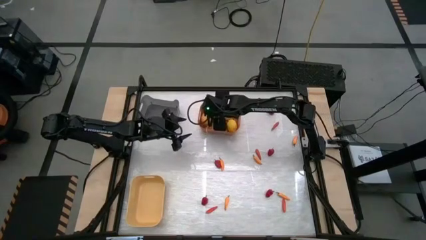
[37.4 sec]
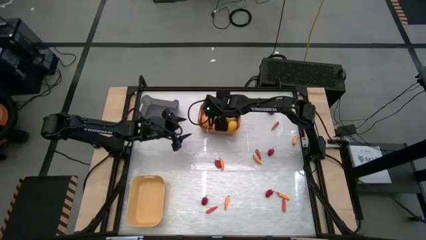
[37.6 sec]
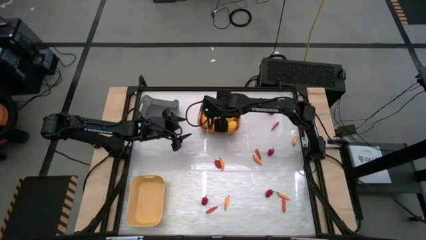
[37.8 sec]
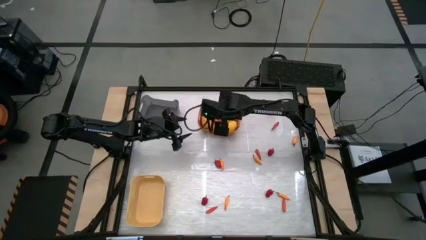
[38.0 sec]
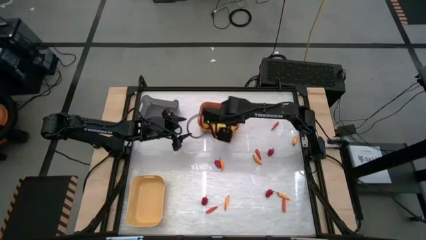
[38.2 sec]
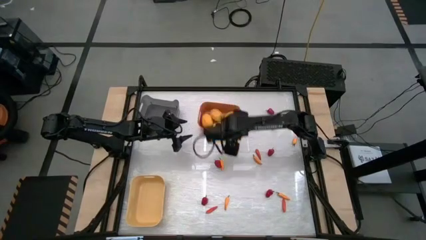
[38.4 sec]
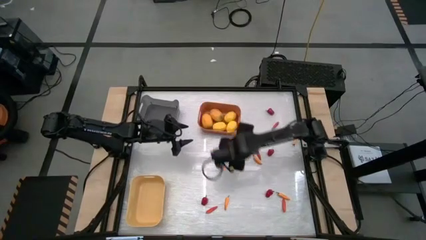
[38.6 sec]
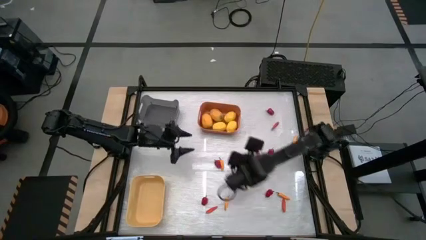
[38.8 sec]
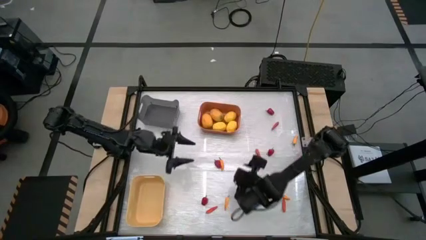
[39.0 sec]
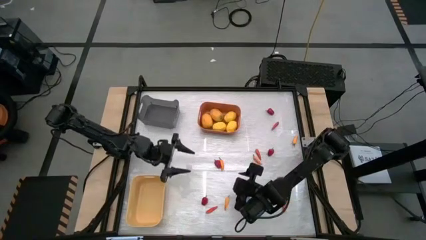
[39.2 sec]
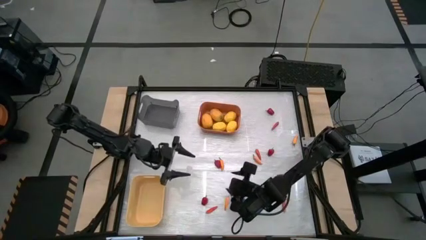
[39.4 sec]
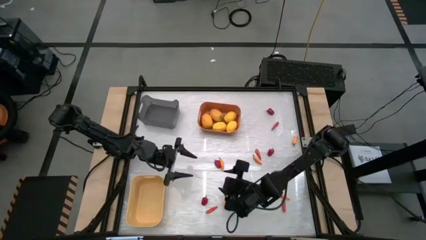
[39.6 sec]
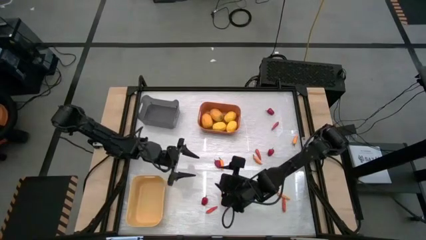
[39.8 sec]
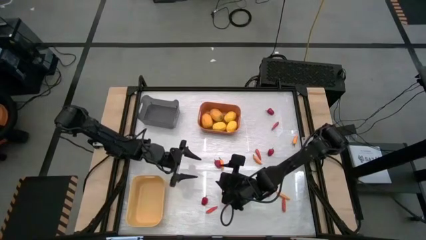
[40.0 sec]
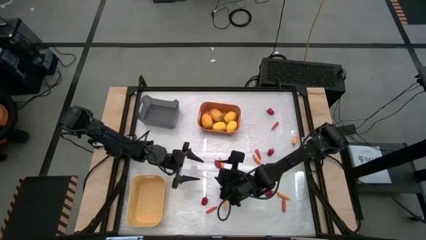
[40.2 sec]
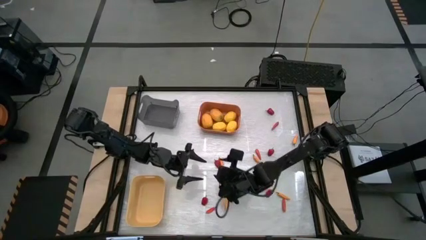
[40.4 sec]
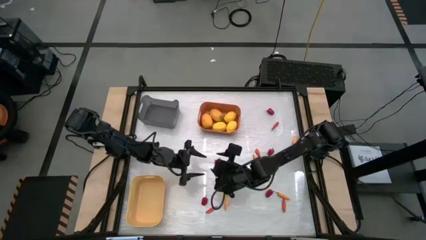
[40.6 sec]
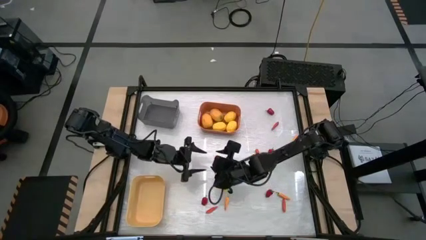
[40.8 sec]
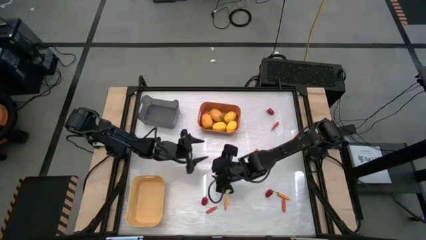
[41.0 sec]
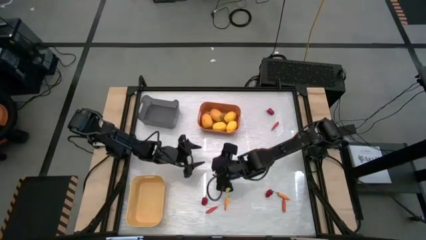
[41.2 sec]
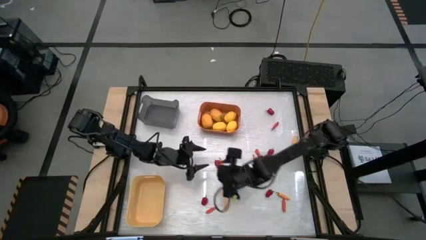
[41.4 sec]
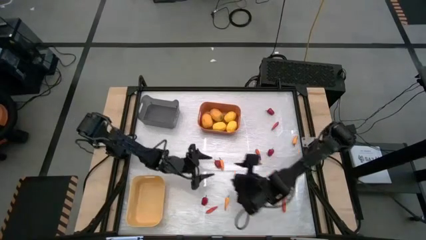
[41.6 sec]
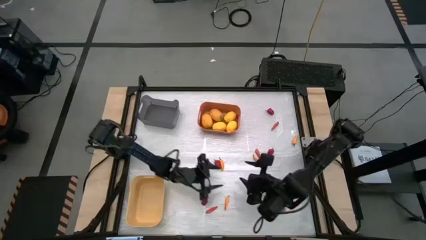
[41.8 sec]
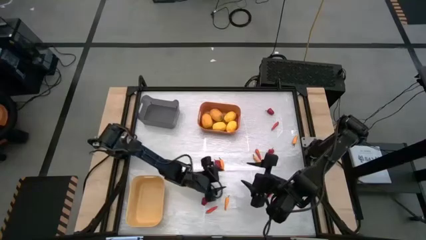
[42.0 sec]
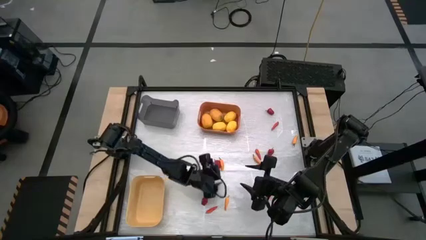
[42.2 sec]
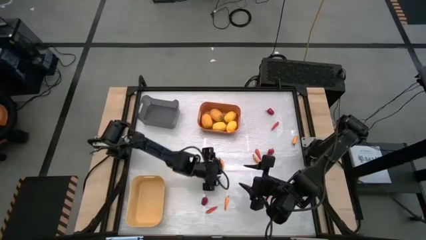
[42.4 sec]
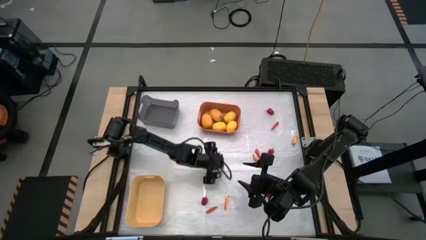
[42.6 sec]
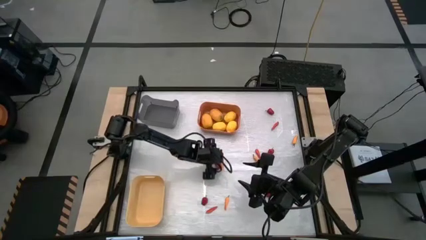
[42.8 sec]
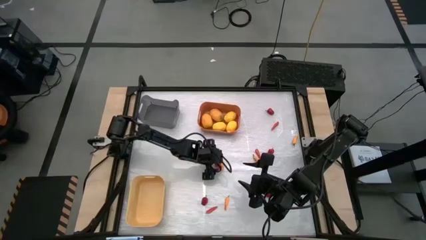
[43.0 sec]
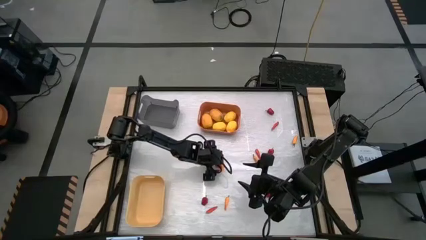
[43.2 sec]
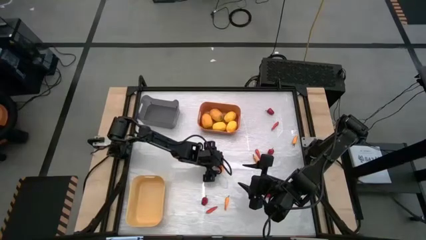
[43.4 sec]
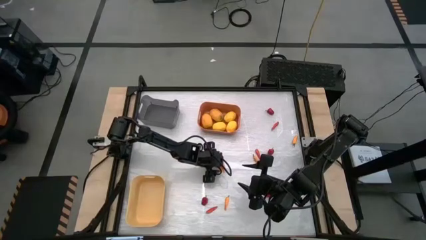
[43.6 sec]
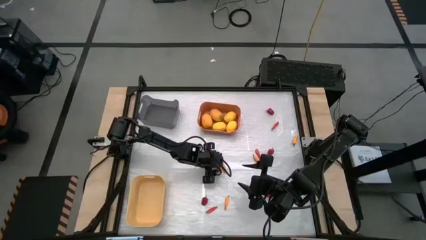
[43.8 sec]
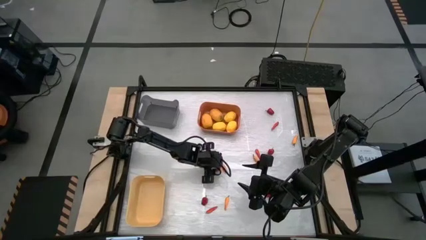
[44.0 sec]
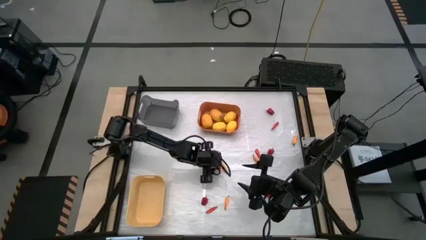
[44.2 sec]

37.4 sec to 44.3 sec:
Task: Sort produce into baskets
Put the red chili pepper into the yellow bin

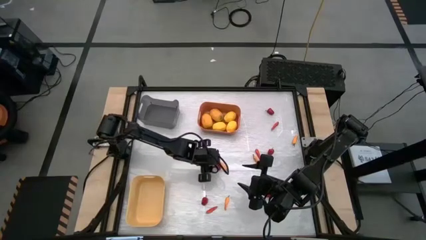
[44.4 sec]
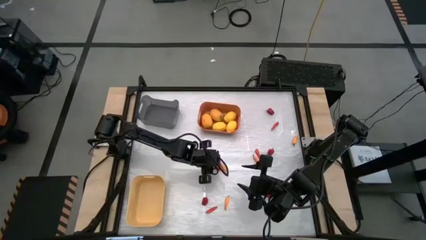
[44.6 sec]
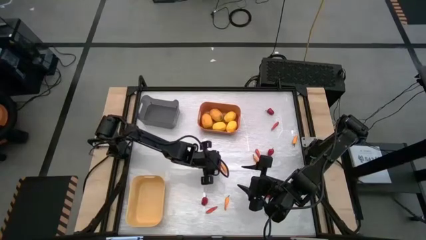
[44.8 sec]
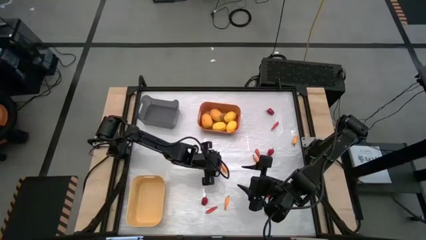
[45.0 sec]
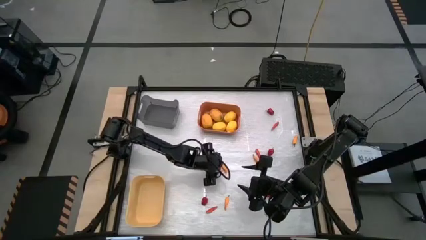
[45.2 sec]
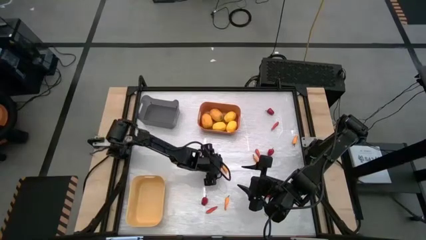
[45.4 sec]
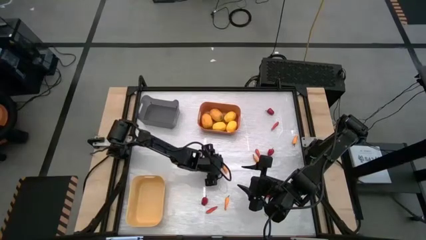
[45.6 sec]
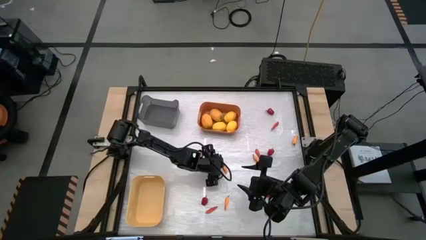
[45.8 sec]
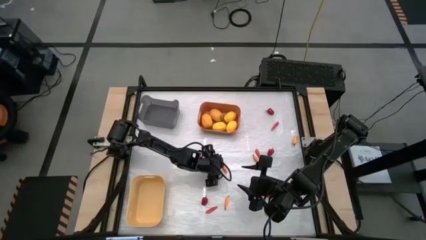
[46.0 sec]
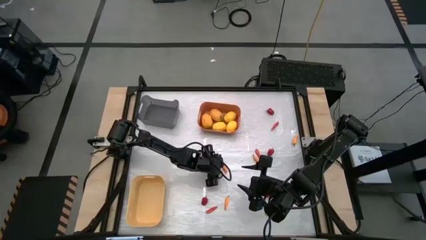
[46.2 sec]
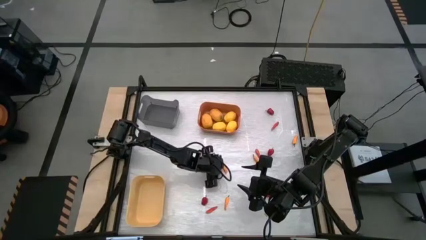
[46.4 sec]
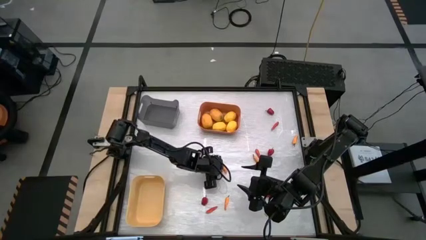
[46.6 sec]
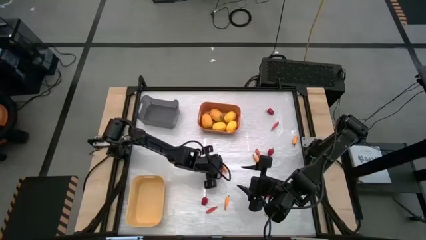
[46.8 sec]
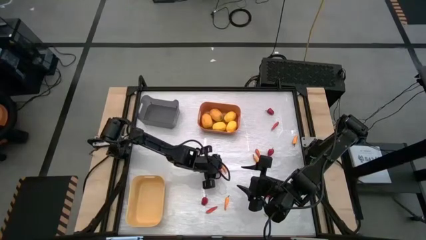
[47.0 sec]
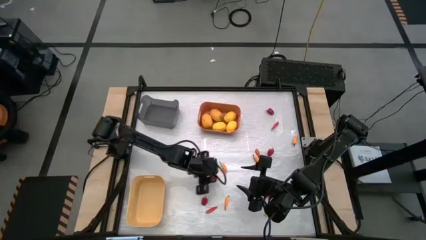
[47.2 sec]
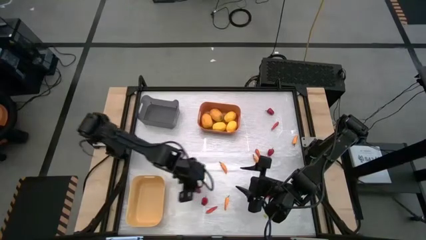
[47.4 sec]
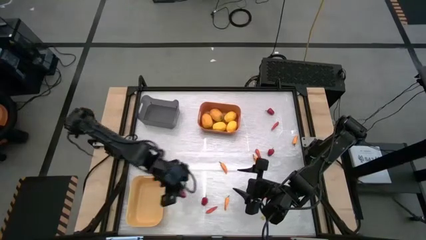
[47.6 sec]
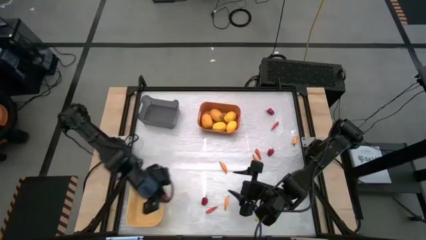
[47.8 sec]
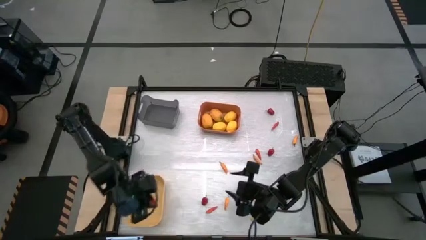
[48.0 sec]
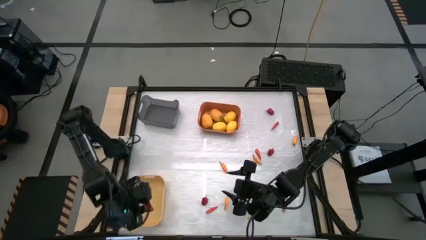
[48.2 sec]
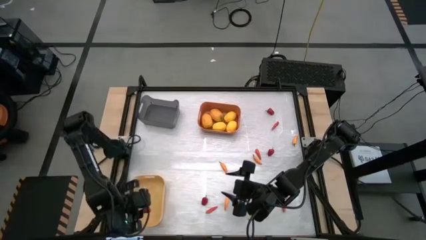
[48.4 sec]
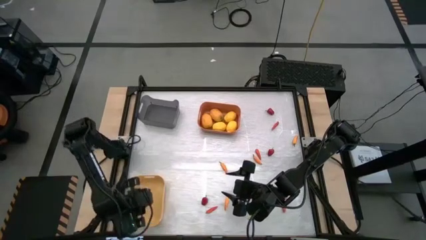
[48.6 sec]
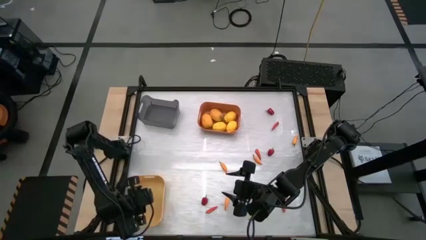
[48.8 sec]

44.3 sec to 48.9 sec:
Put the red chili pepper into the yellow bin

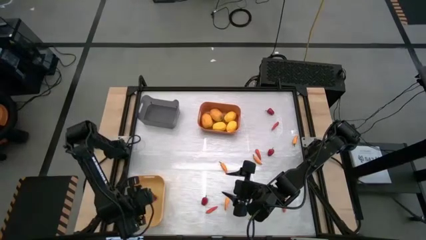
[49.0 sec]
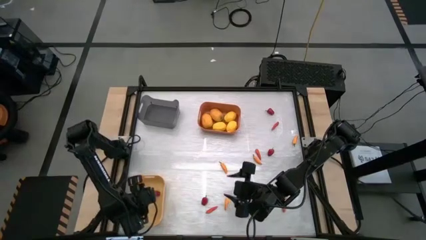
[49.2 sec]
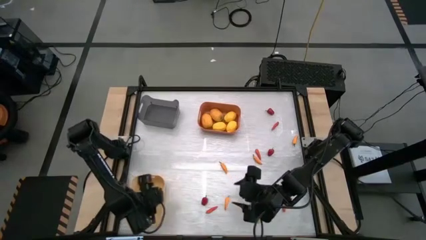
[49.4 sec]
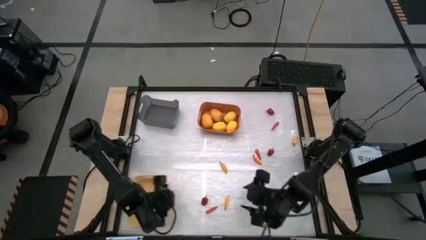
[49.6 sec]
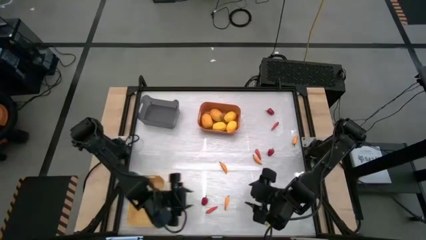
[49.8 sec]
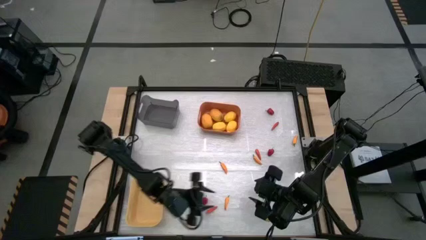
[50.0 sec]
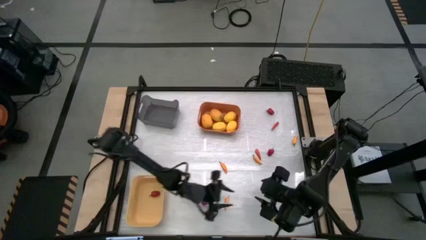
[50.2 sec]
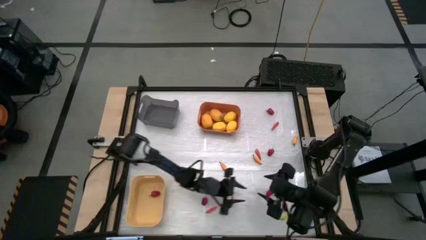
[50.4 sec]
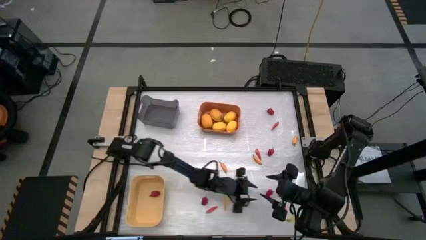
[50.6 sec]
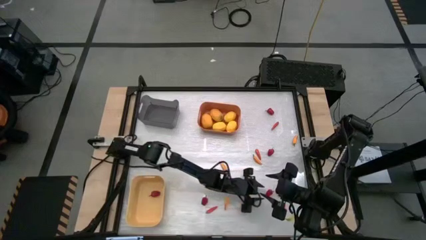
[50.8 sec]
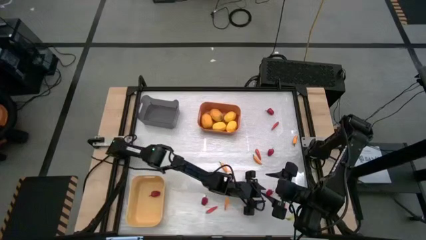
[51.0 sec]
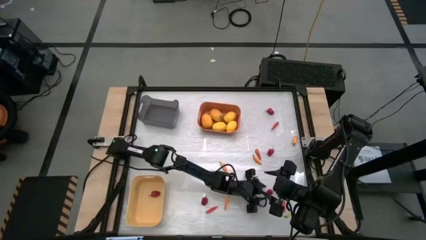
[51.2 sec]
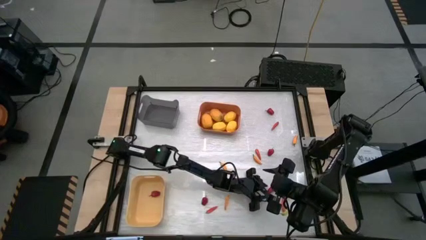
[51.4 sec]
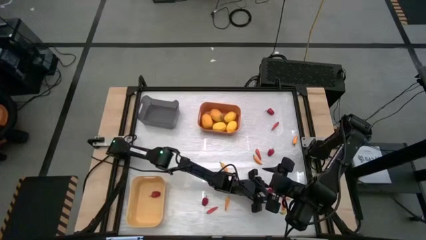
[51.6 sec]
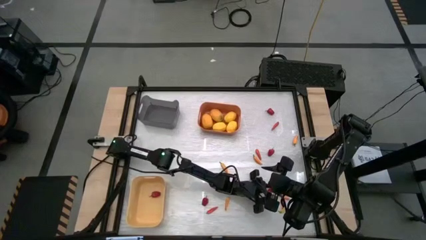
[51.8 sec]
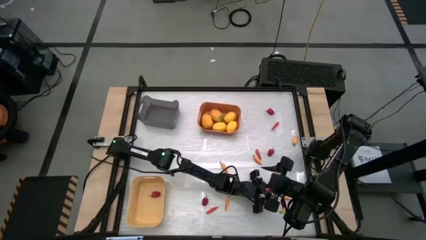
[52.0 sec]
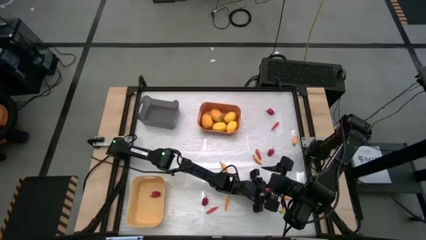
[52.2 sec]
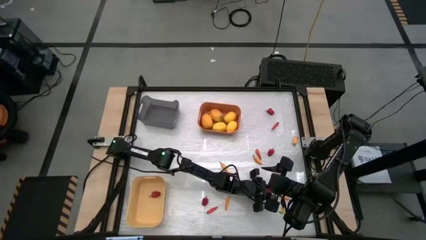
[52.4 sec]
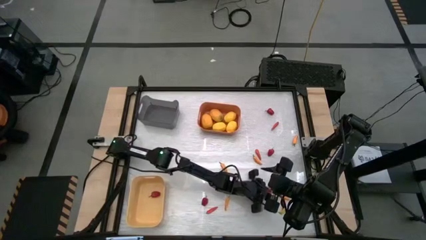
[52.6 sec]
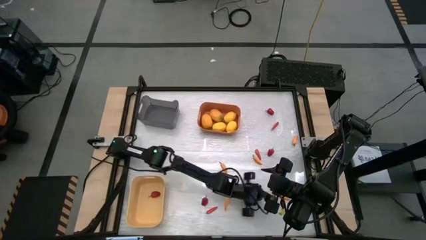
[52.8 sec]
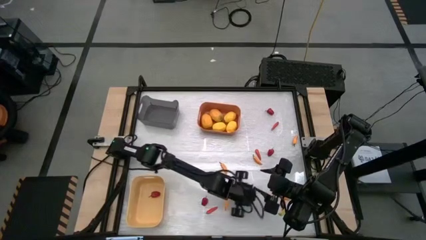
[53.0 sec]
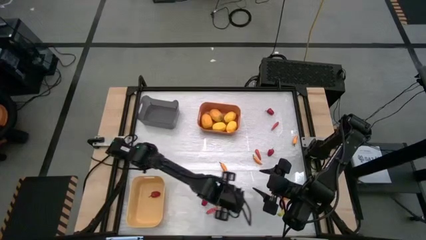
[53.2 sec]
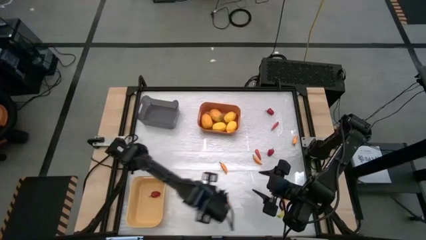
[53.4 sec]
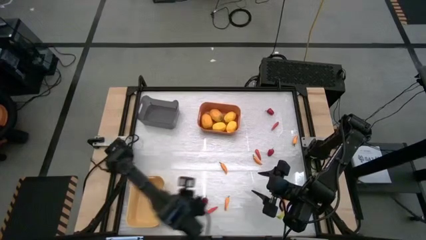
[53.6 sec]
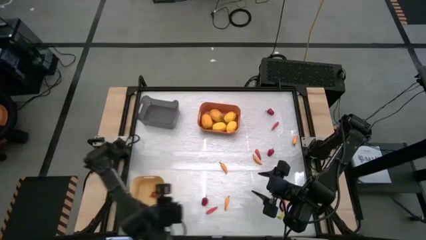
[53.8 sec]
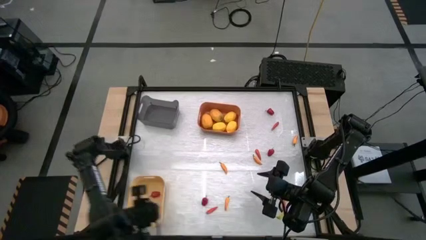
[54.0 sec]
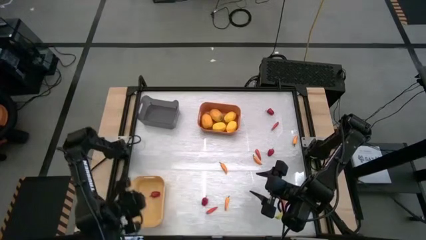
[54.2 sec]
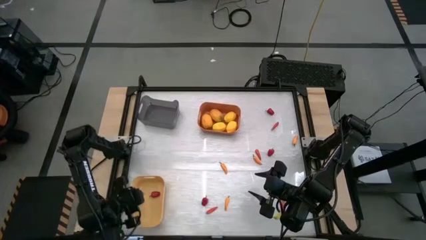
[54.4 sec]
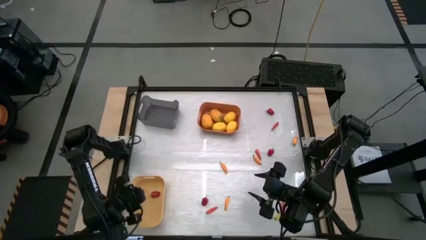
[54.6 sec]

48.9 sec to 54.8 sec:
Put the red chili pepper into the yellow bin
